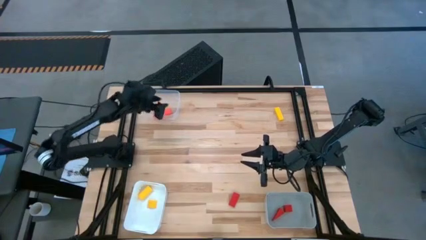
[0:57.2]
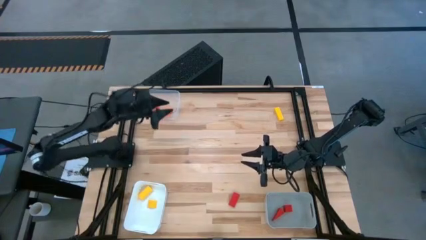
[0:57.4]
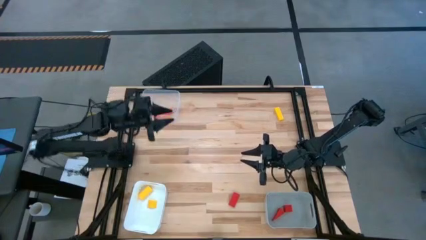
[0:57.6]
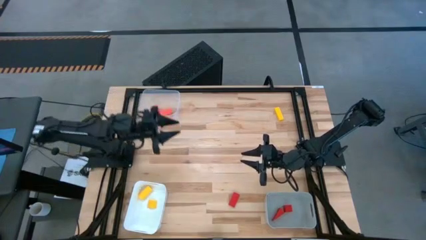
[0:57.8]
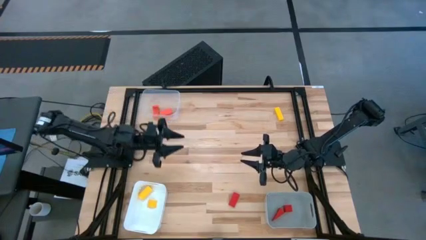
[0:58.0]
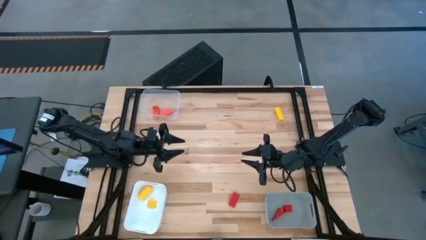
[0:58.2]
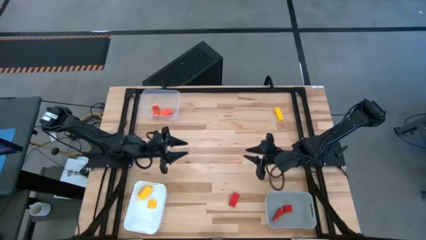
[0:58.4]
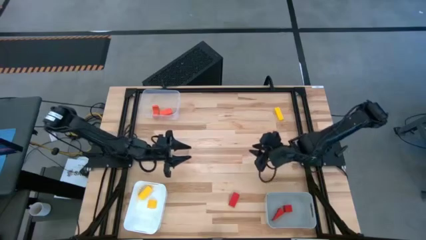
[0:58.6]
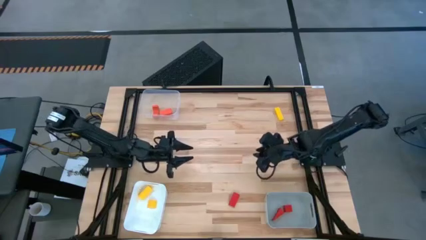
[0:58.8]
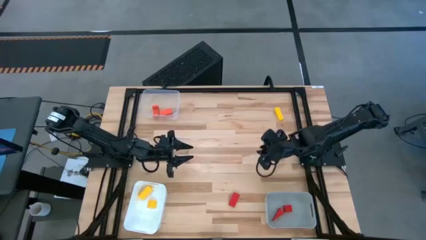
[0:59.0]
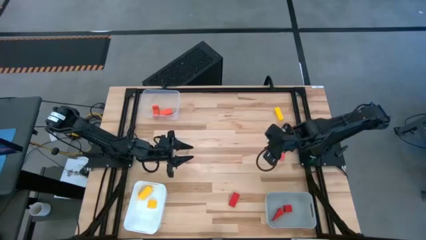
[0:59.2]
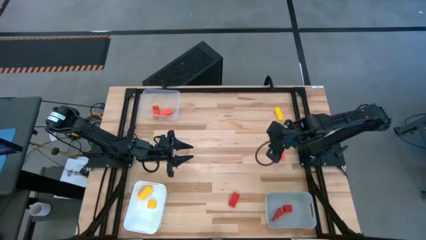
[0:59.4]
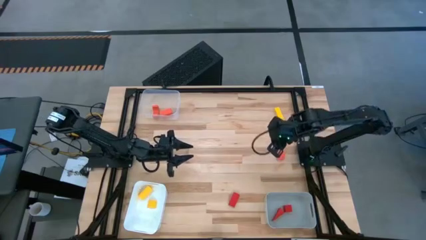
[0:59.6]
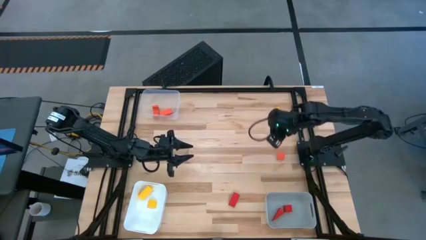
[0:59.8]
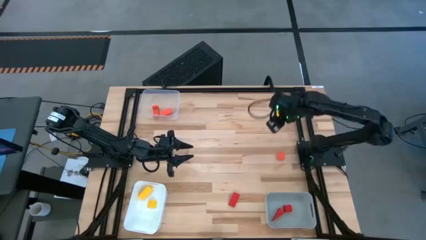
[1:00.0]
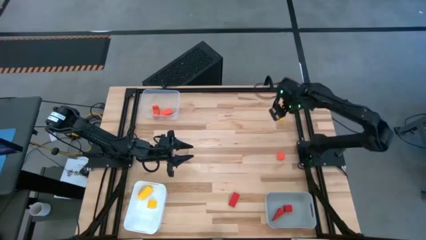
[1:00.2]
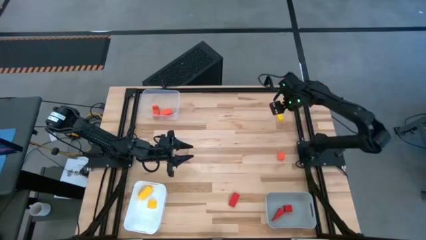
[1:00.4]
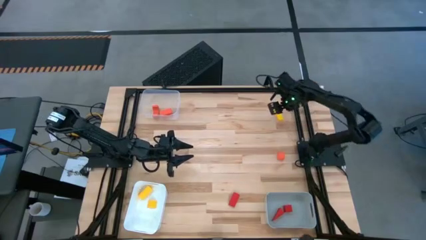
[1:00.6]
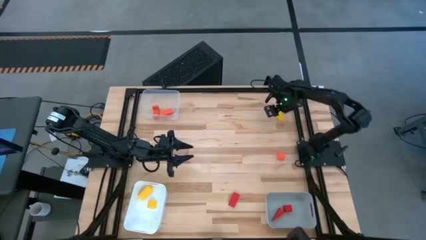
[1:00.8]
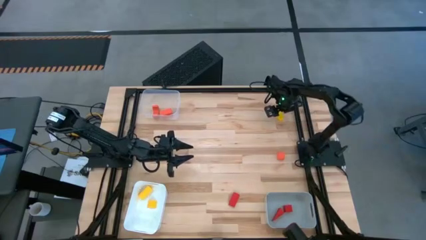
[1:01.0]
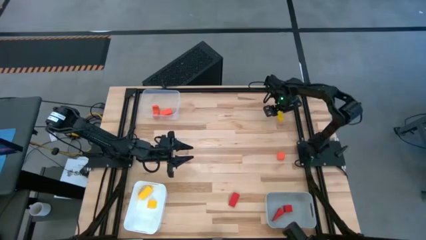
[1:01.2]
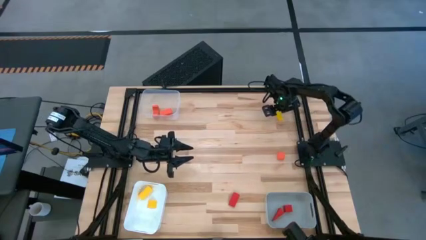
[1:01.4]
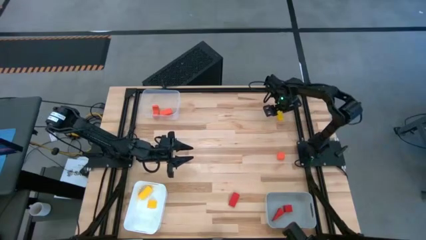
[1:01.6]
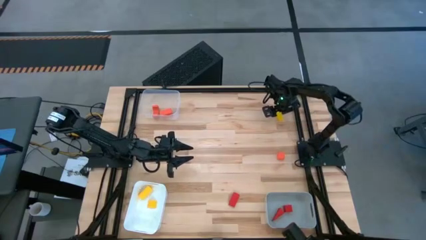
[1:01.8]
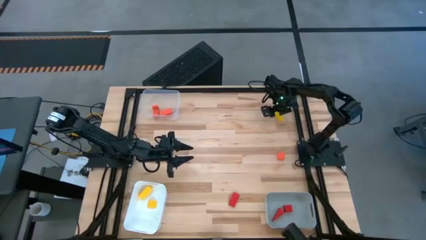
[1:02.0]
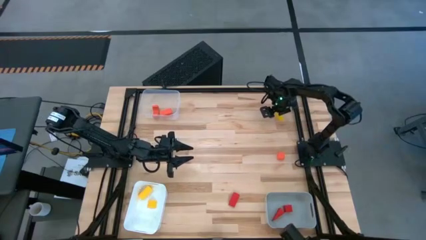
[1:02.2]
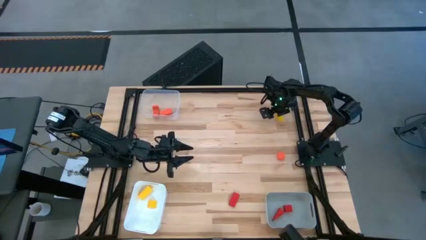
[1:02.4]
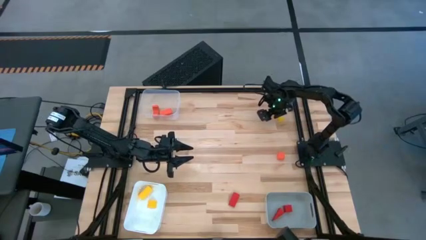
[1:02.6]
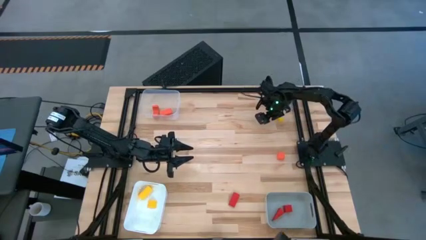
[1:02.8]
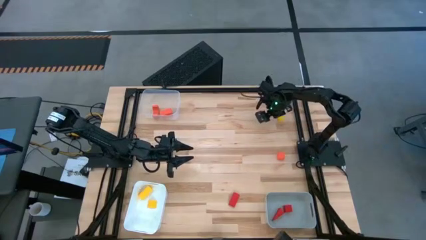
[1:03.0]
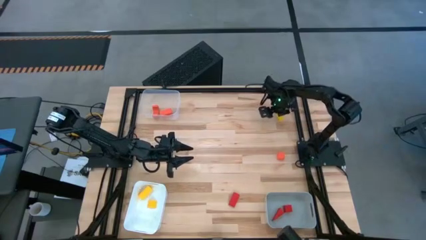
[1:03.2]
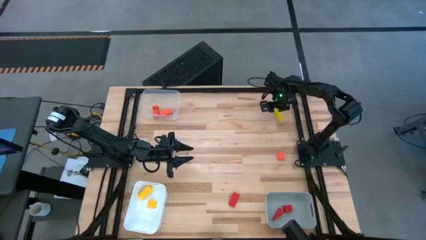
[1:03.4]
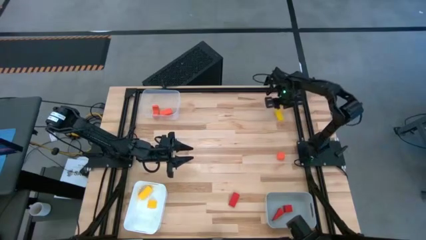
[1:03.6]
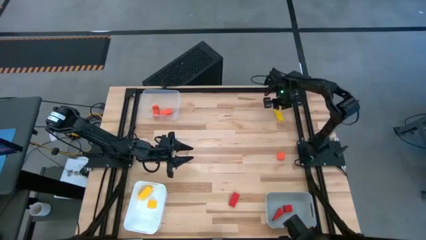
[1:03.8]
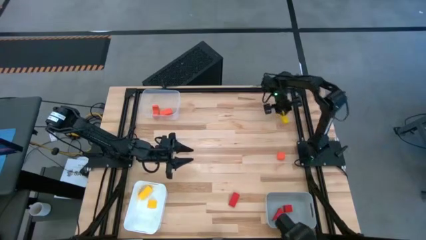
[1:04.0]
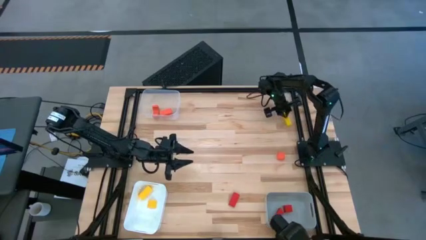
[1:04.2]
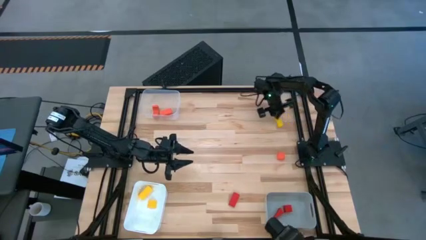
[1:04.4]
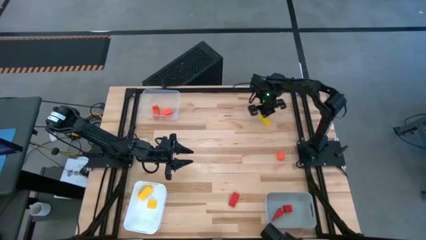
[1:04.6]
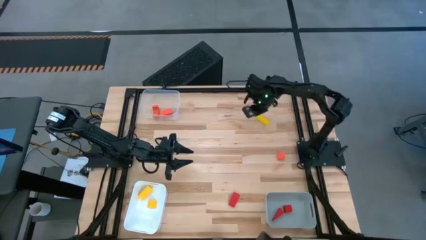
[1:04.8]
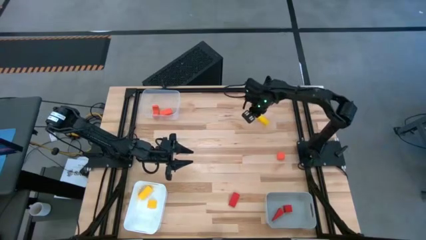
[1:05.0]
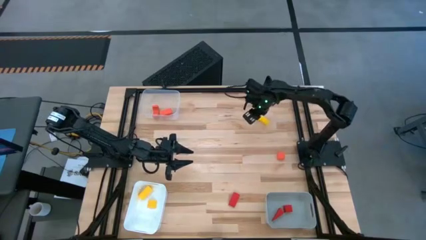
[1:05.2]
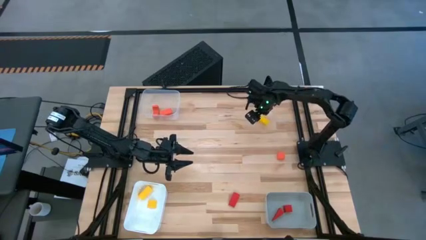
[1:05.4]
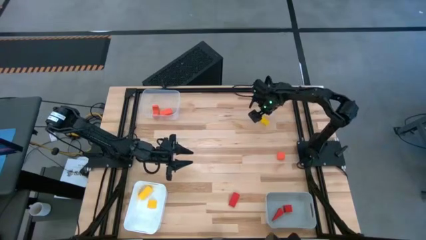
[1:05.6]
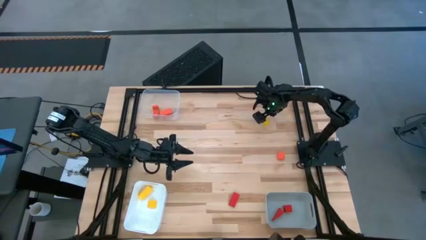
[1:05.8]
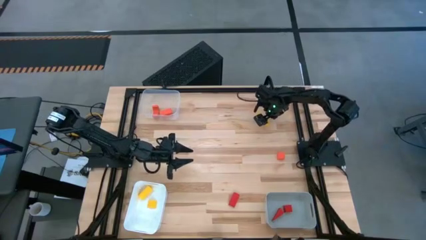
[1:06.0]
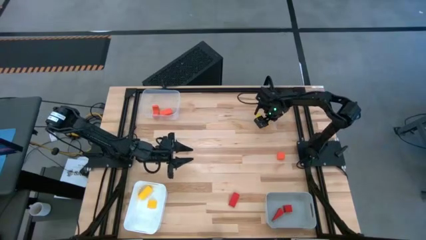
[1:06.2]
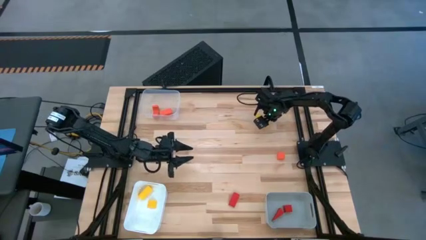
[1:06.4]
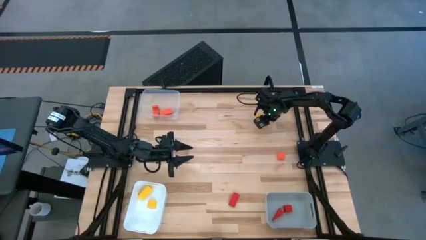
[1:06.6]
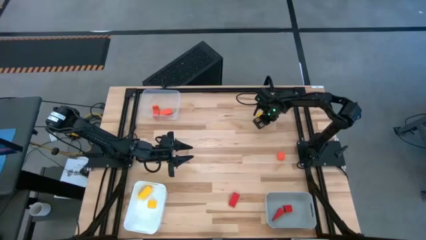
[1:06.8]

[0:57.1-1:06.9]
Task: Sort & place blocks by color
Put the yellow block into the white bin

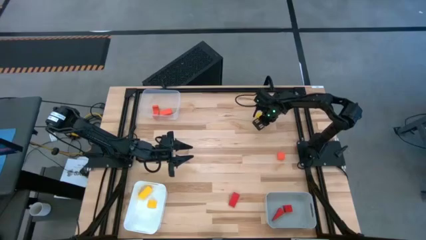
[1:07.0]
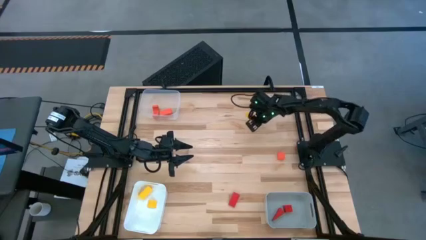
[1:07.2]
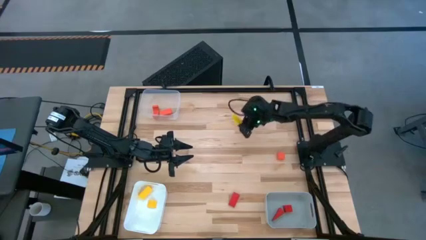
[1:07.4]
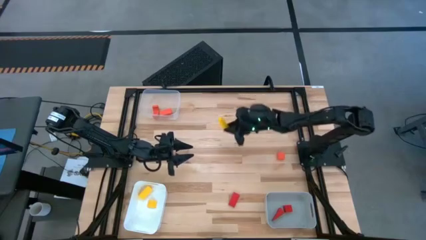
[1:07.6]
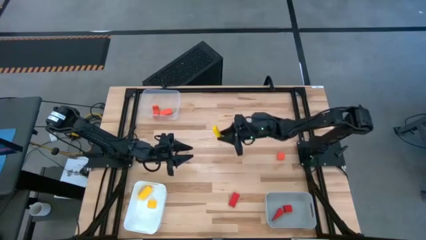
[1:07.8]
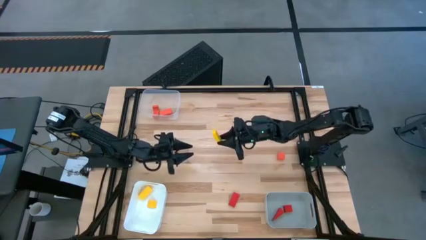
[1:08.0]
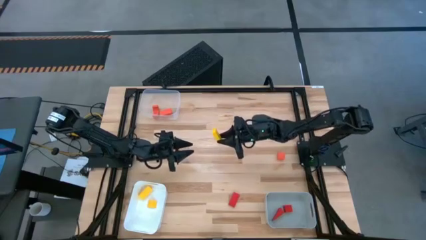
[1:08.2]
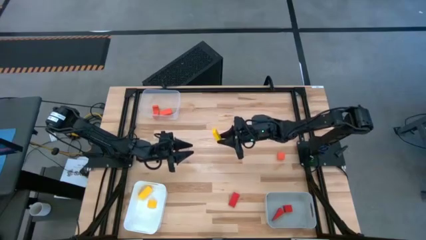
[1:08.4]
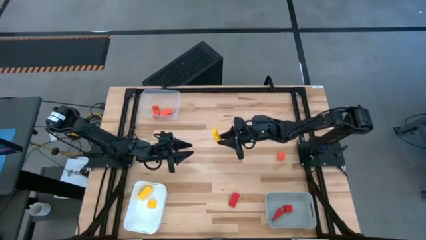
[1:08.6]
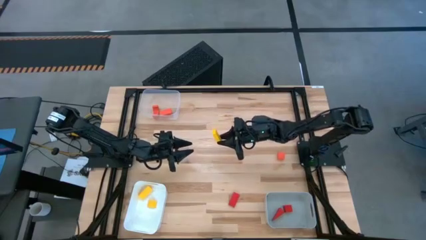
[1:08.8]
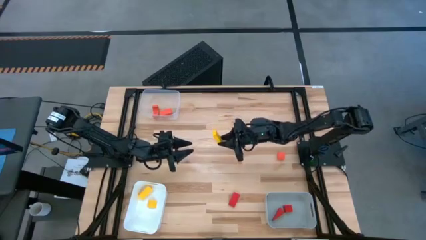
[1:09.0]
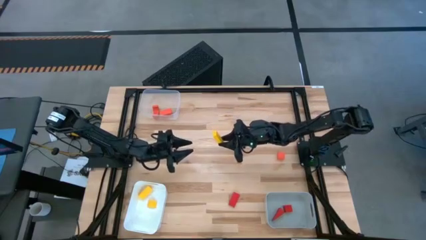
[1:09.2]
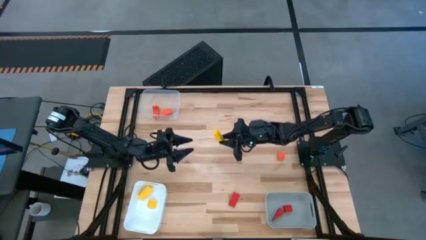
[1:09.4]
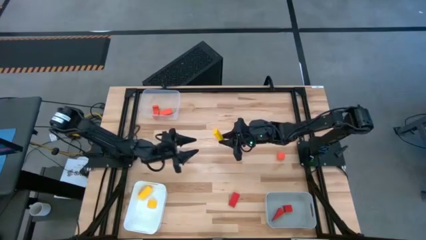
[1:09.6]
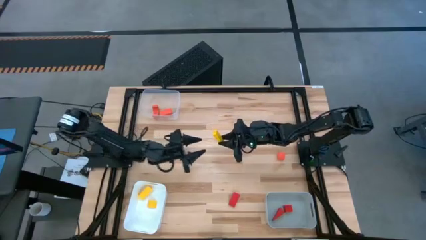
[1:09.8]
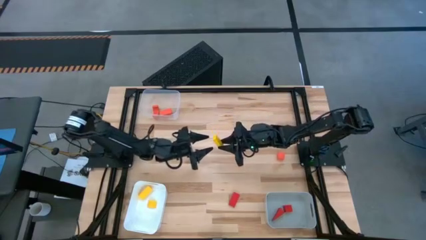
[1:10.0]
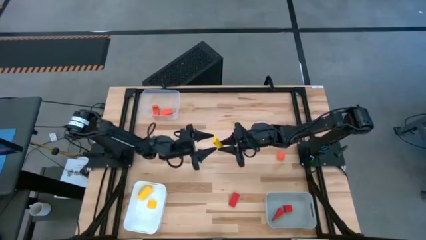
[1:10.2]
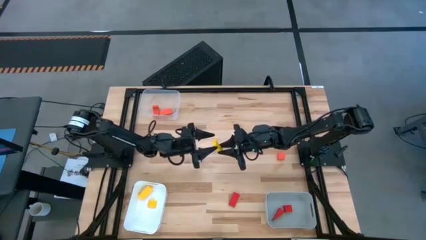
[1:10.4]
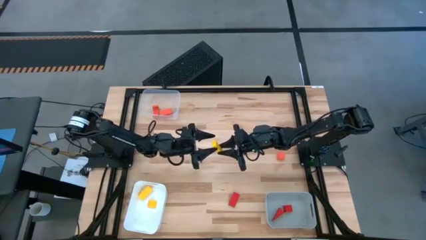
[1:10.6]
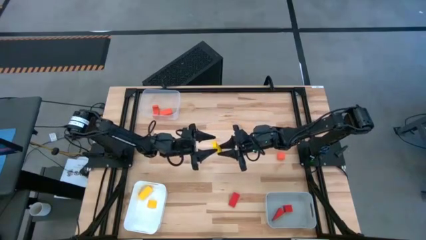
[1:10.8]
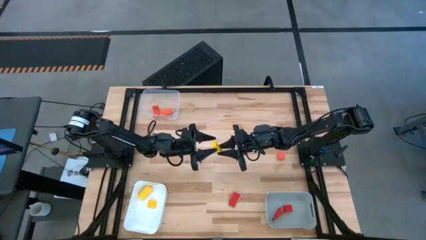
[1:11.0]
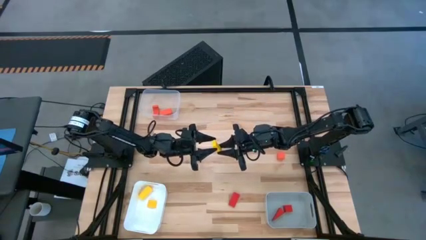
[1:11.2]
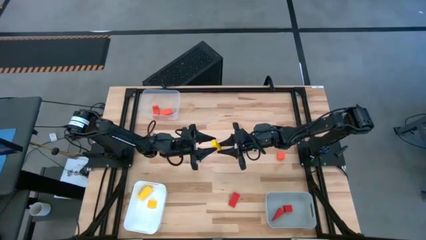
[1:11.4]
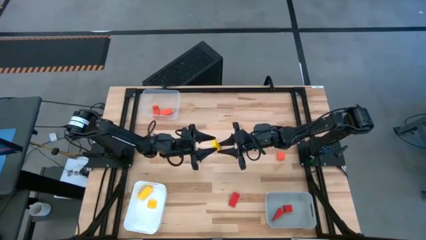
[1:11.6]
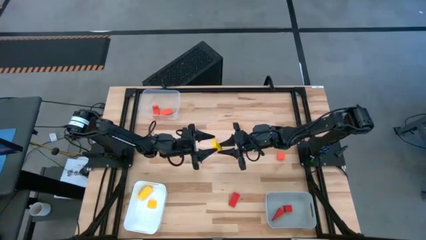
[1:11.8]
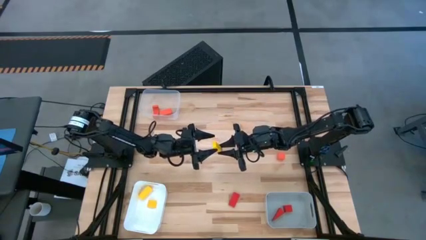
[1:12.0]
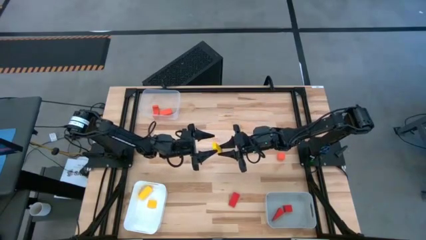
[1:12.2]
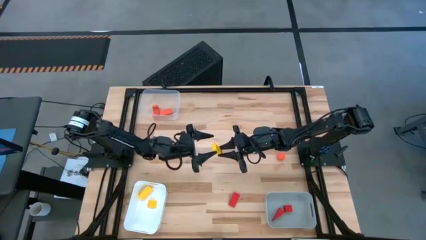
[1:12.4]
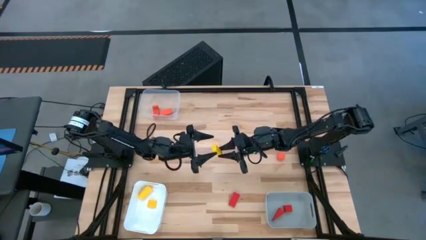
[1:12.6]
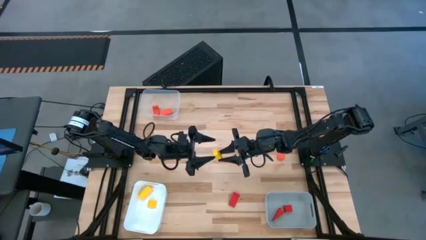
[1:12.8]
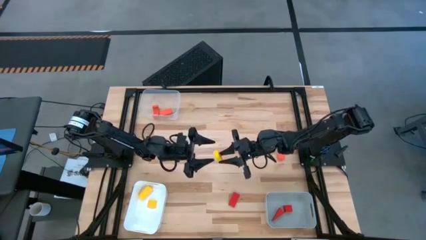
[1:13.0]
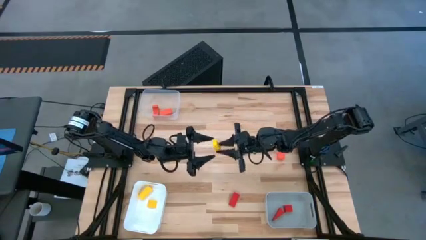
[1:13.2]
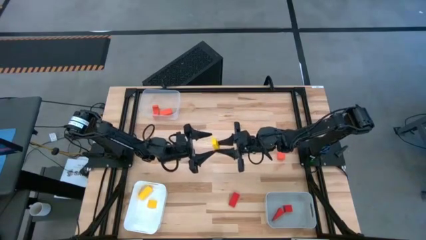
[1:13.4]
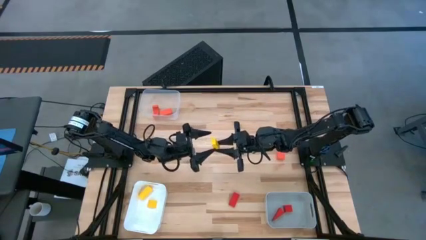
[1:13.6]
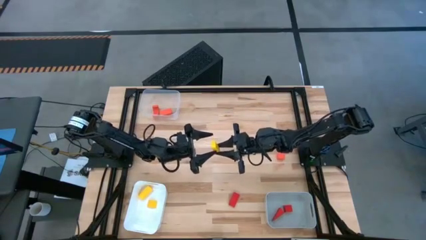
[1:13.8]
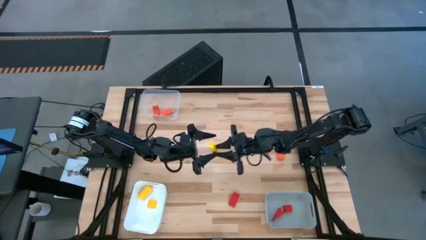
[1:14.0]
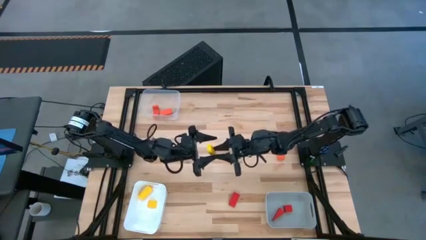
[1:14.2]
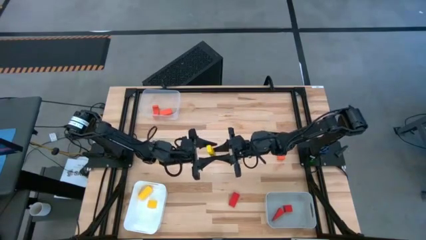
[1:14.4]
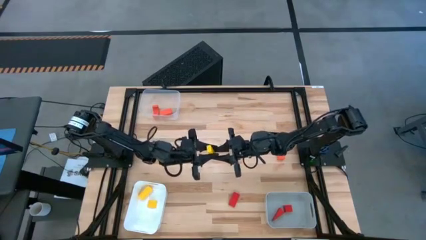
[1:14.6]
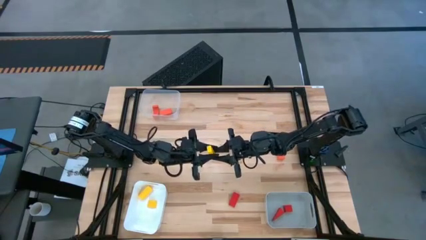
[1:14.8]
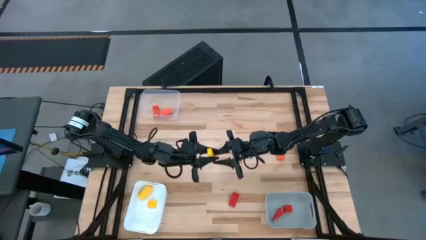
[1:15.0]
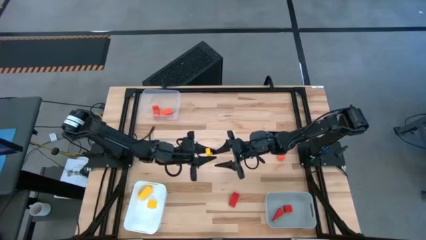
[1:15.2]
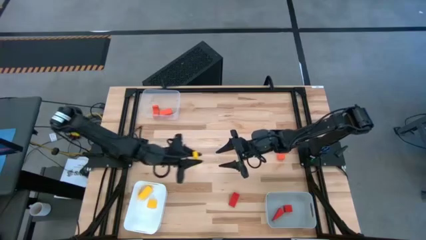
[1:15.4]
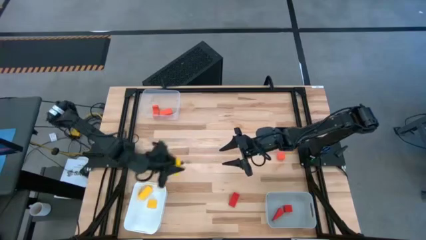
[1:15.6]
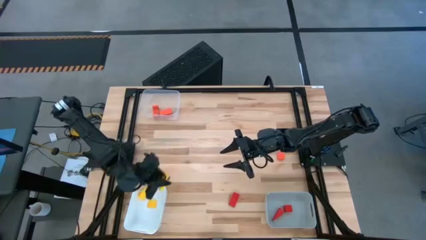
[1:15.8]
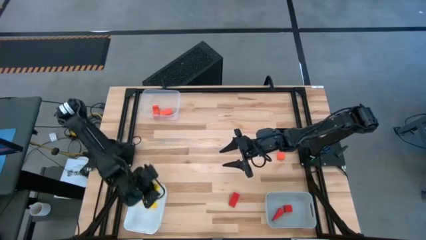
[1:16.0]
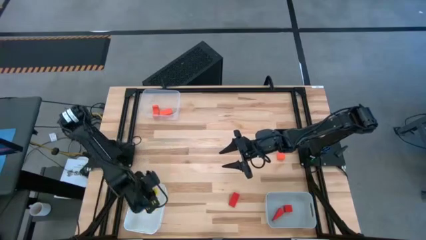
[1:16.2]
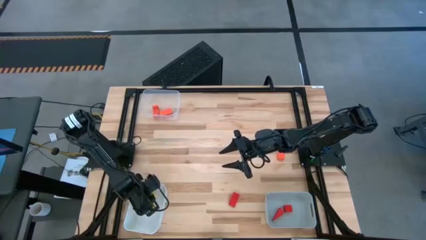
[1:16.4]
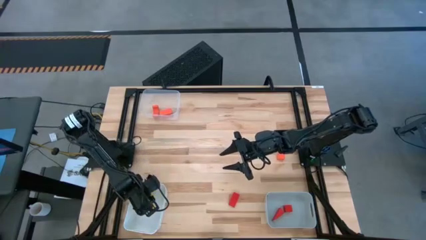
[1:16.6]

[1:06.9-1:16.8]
Put the yellow block into the white bin
